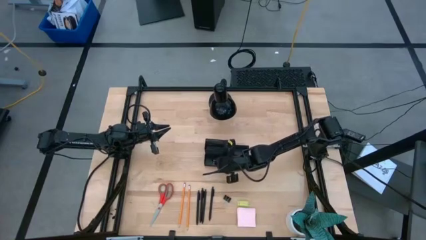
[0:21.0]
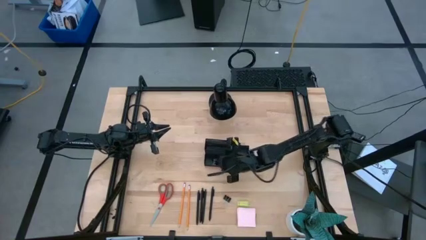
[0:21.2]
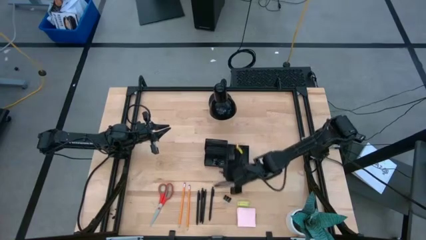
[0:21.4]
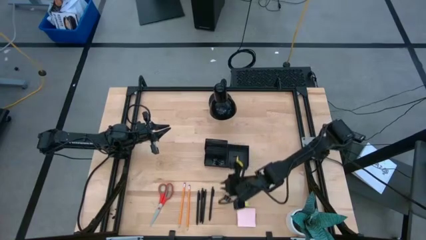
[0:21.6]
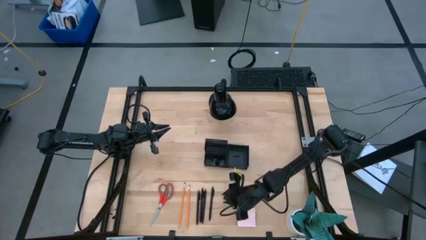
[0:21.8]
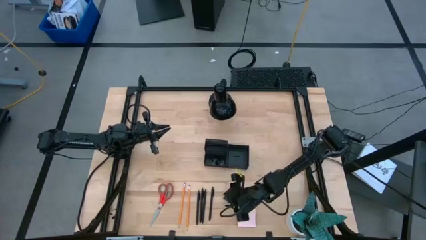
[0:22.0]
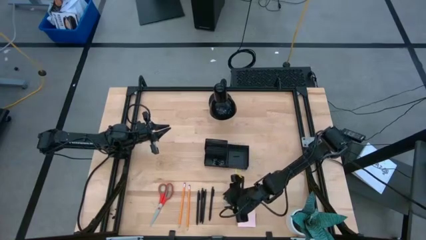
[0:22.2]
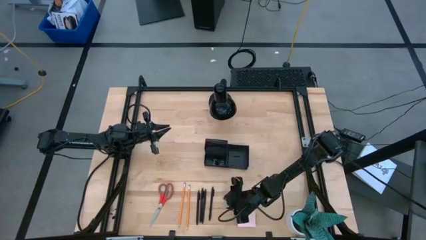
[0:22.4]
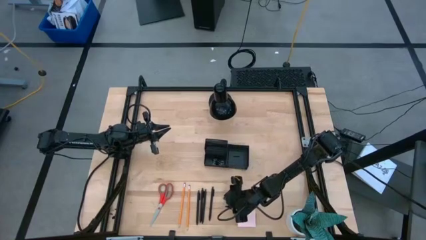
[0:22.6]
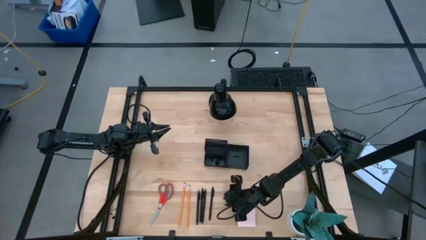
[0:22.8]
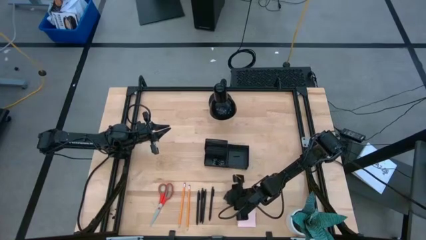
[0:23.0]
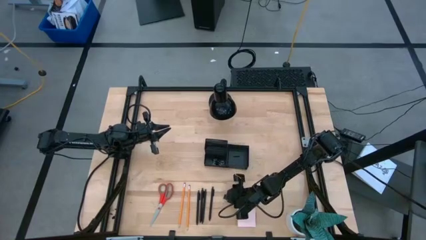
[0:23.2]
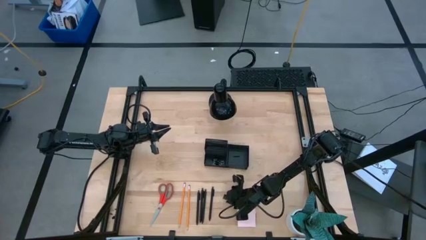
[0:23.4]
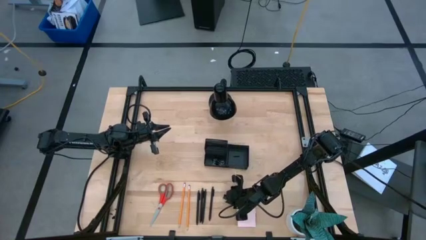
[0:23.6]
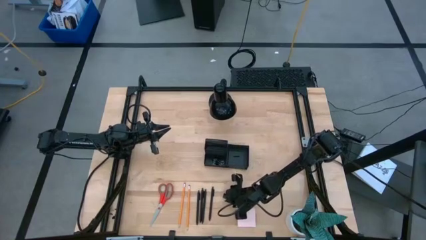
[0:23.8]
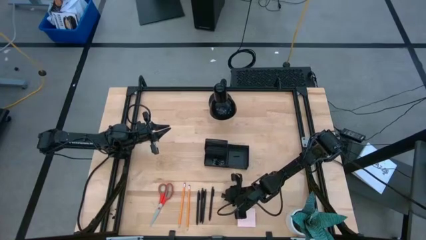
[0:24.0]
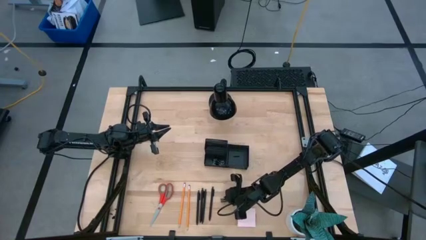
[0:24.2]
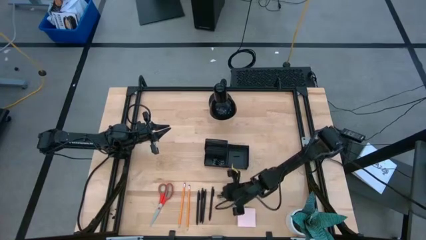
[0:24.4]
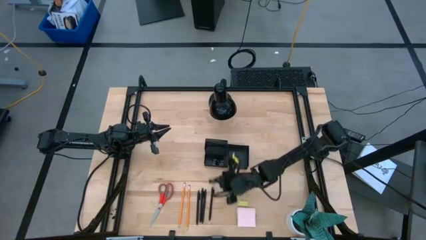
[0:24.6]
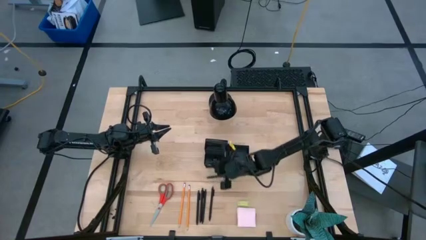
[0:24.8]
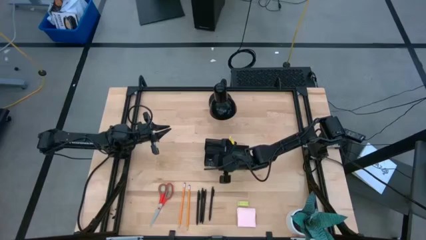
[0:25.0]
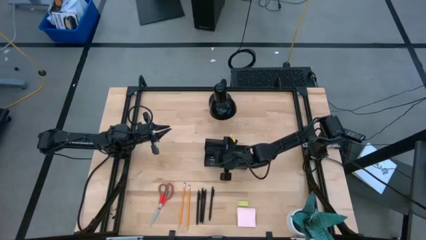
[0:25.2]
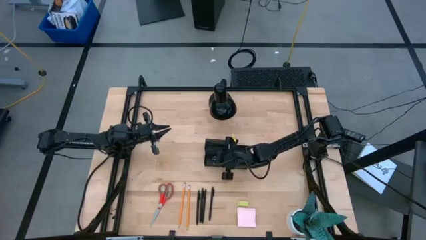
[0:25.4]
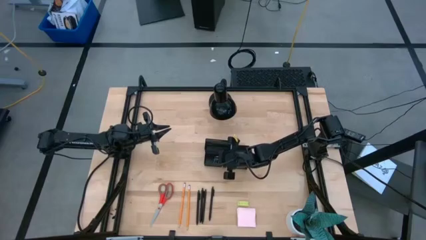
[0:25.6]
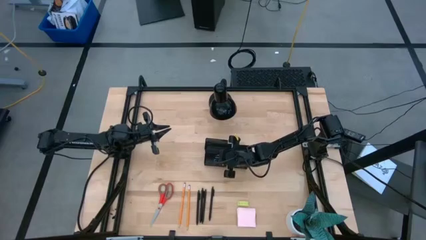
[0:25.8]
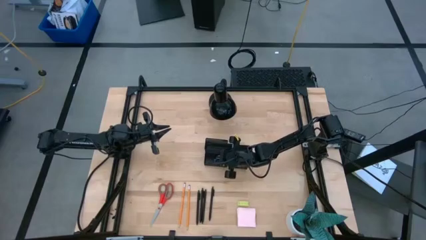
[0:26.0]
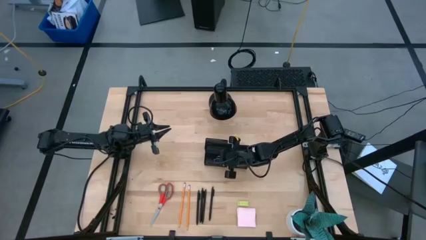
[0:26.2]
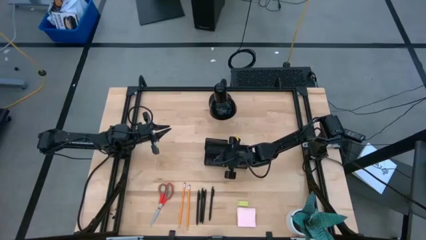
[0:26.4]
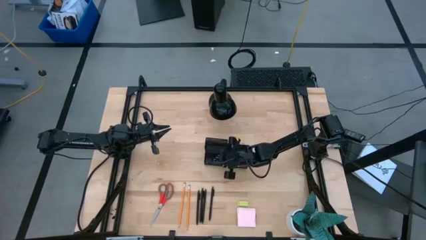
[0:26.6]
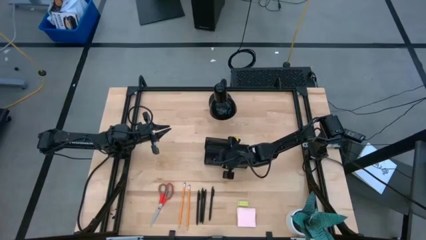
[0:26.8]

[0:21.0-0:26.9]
Task: Pick and place office supplies into organizer
Put the black binder clip into the black desk organizer

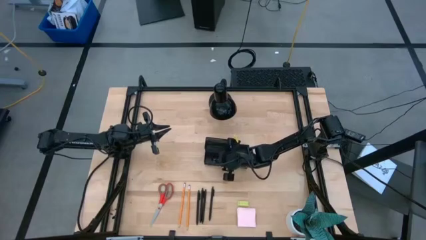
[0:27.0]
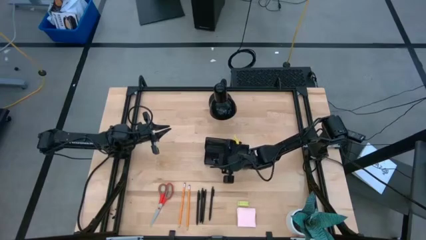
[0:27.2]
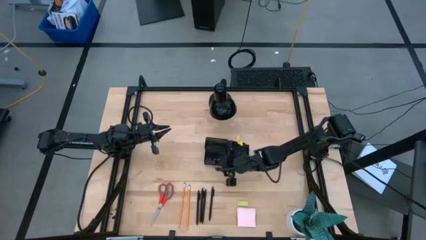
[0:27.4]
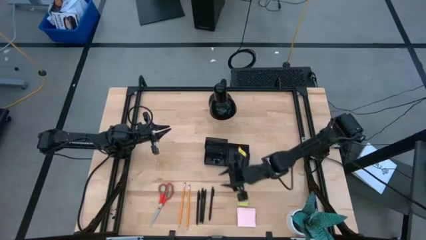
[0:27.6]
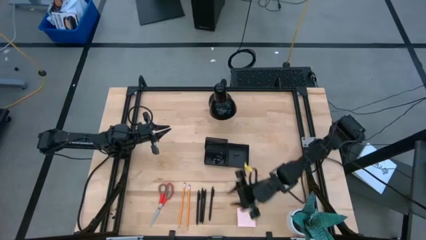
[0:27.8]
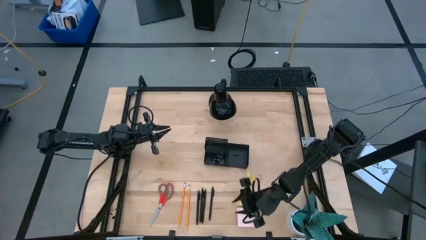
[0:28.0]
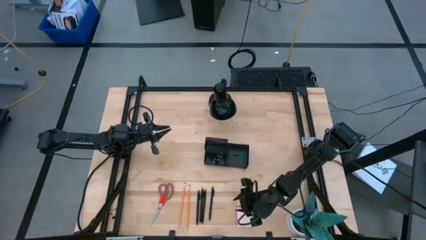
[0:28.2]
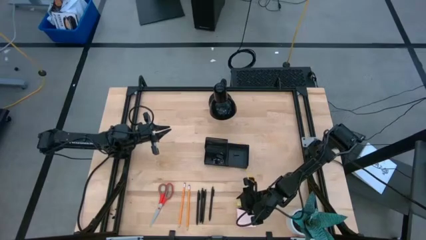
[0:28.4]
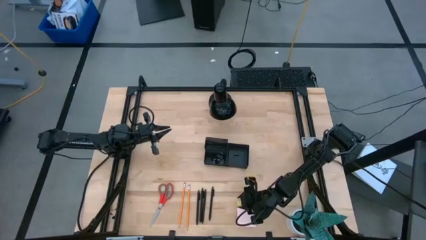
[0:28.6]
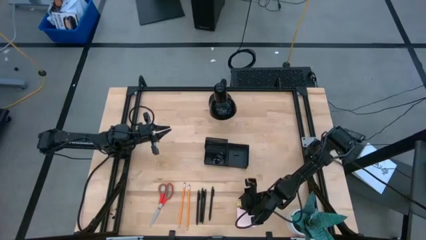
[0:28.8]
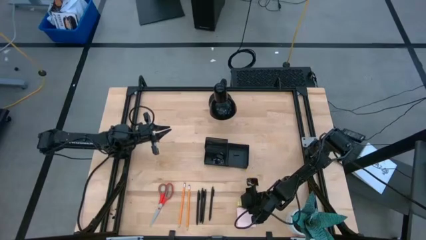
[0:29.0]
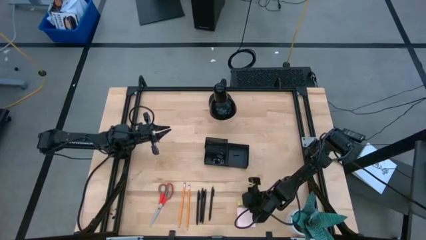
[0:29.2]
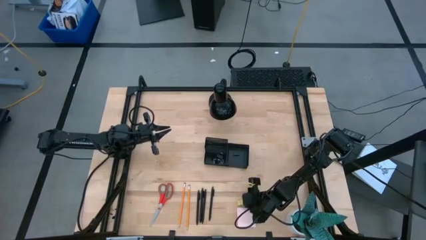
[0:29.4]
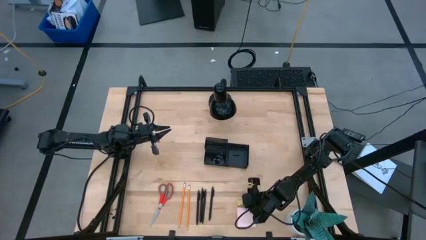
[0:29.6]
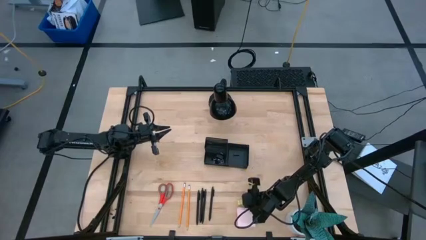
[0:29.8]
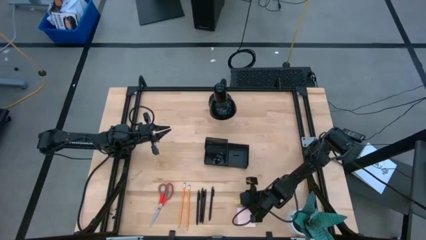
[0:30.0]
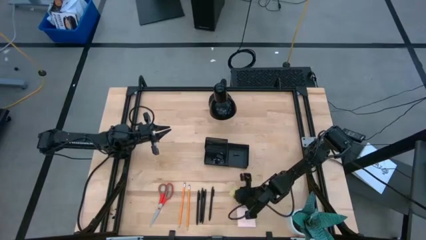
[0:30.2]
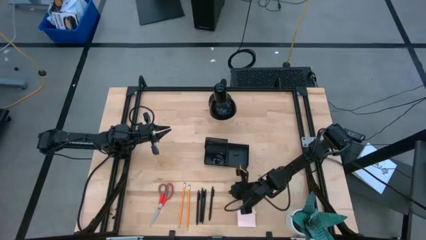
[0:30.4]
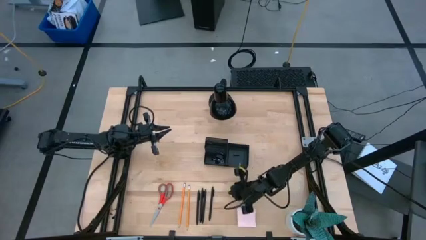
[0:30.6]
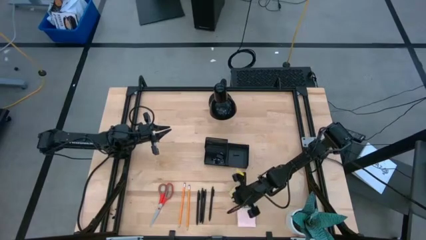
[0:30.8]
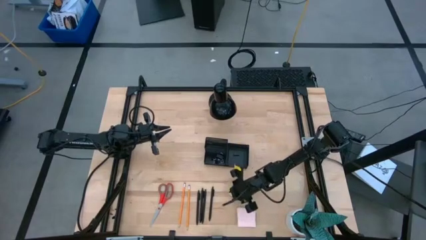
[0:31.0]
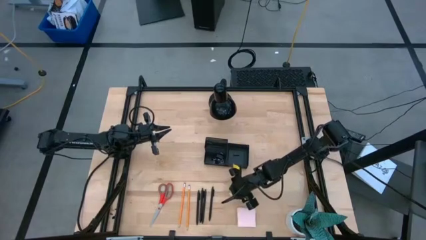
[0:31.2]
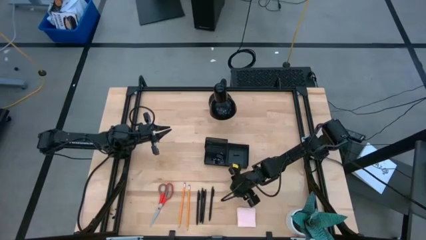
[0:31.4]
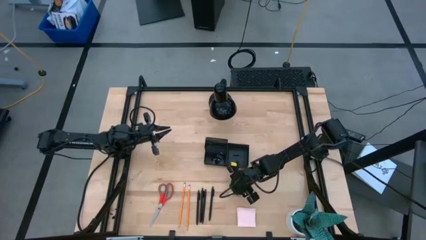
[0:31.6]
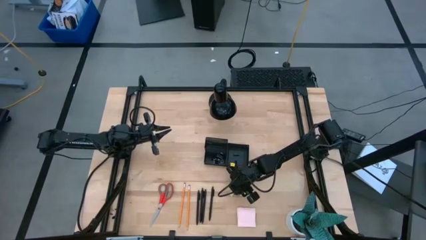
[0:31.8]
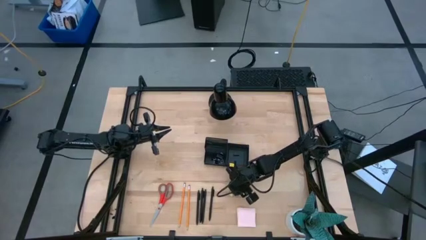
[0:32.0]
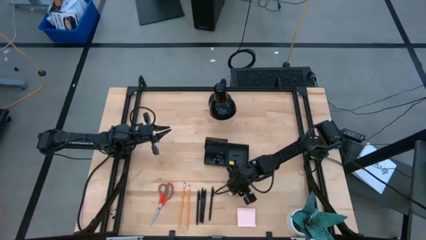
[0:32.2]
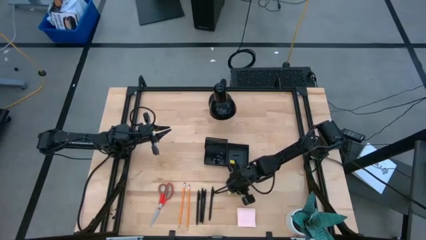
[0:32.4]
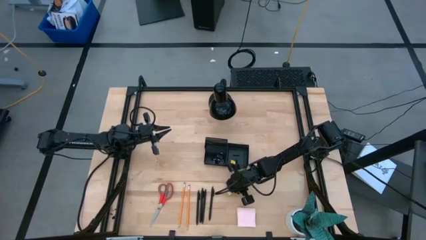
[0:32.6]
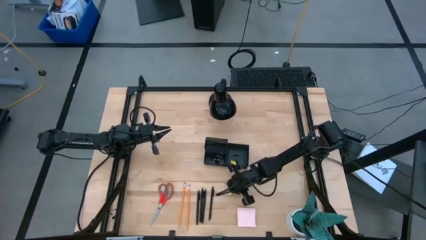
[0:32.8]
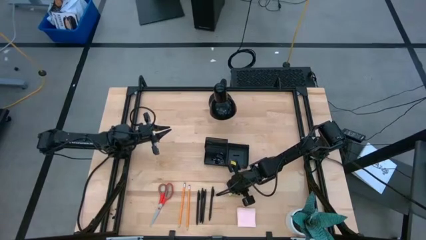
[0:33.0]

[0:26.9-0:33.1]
Put the yellow eraser into the black desk organizer

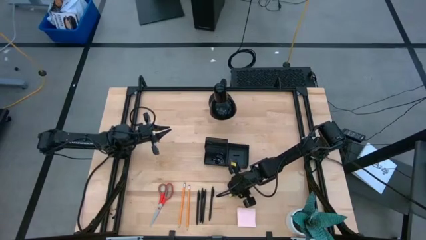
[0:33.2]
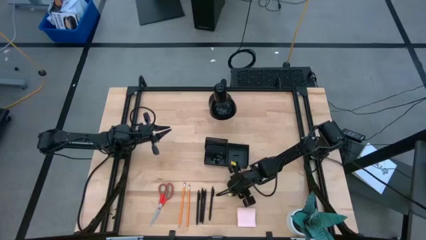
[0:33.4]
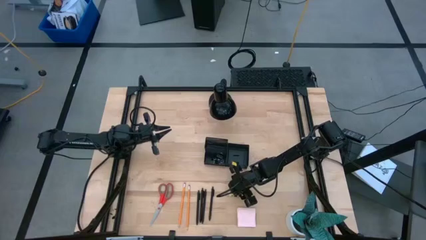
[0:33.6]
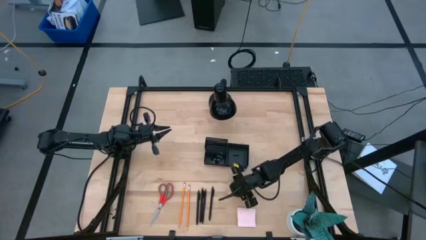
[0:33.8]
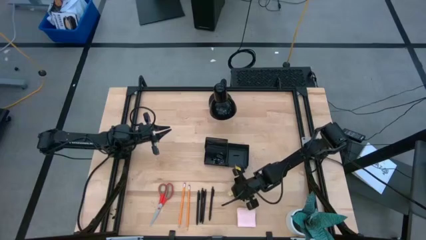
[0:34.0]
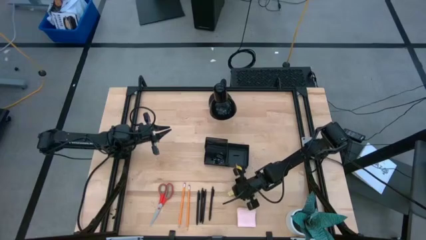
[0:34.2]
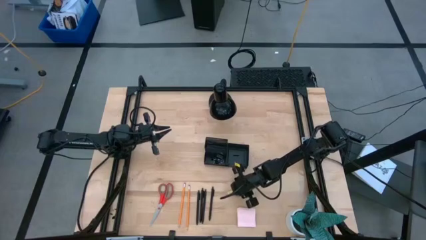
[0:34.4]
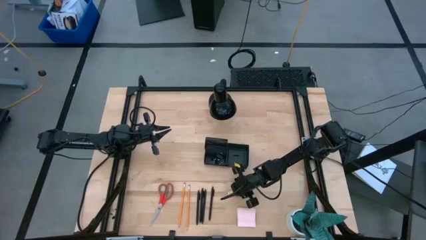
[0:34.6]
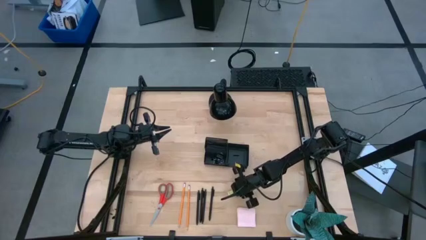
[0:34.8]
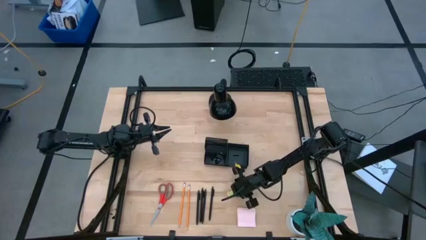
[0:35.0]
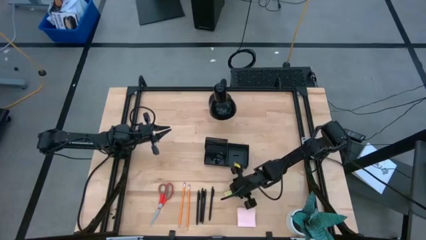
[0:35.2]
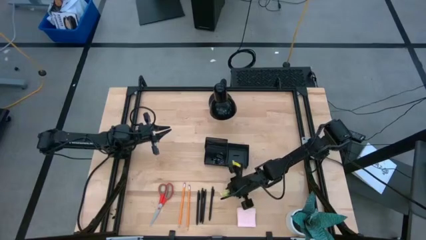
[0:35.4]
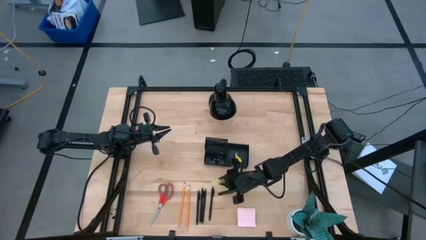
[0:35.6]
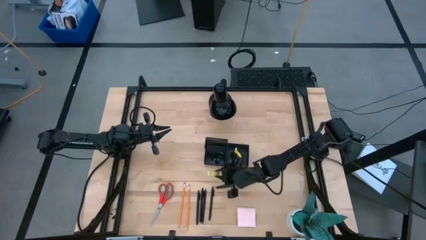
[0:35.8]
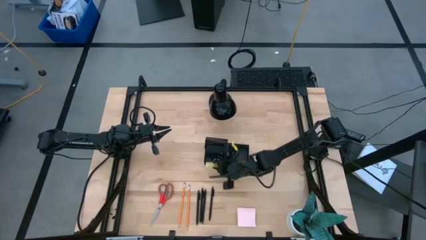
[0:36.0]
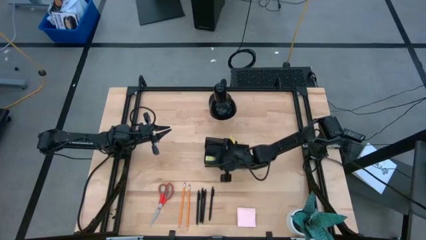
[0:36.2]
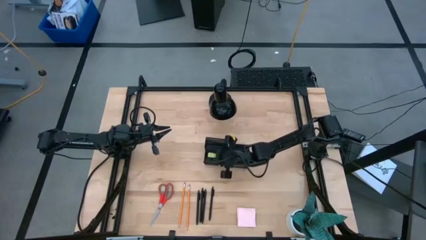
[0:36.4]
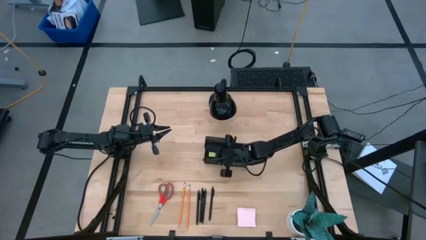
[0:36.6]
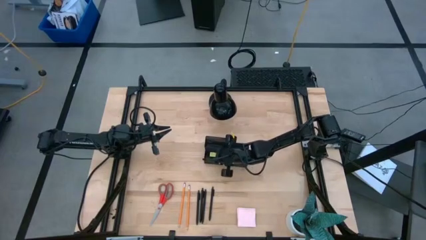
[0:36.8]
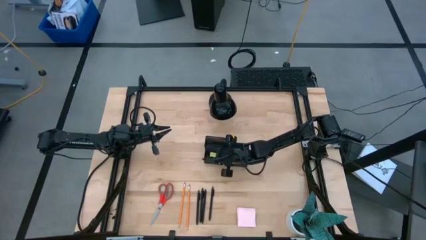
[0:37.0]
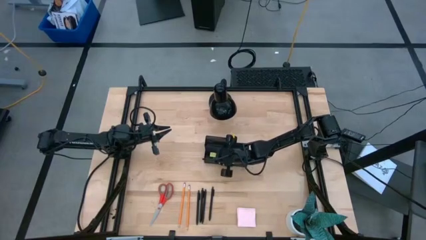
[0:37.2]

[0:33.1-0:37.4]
Put the yellow eraser into the black desk organizer
